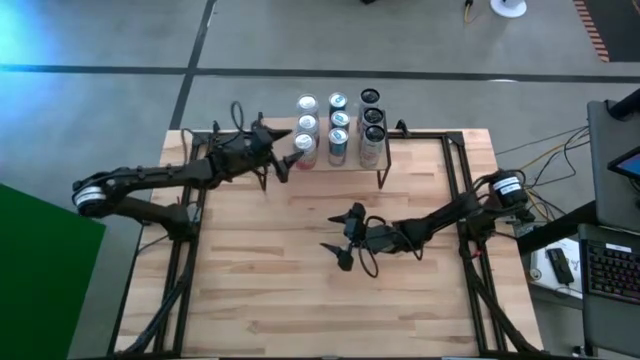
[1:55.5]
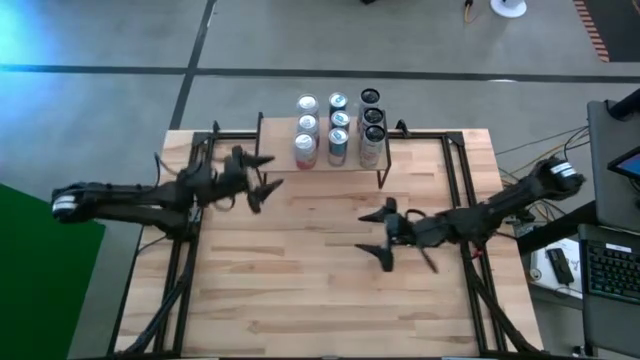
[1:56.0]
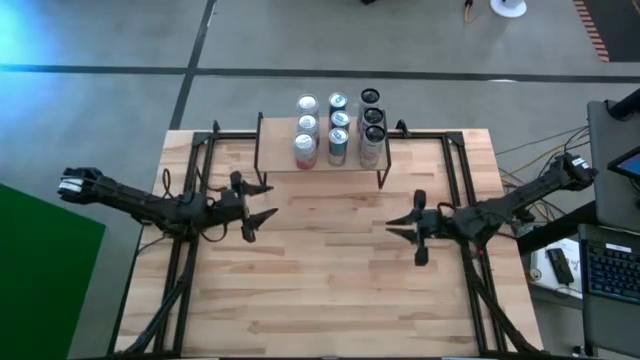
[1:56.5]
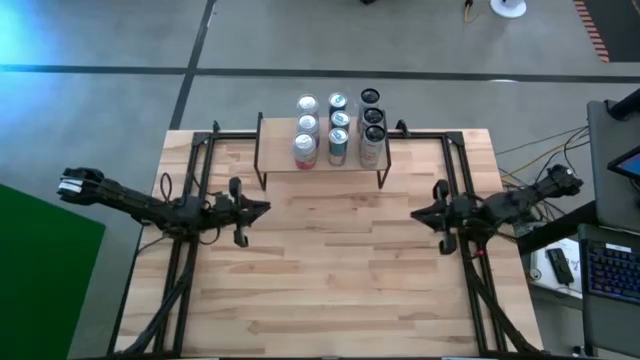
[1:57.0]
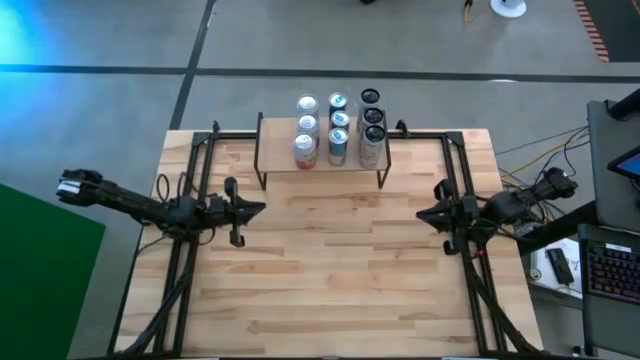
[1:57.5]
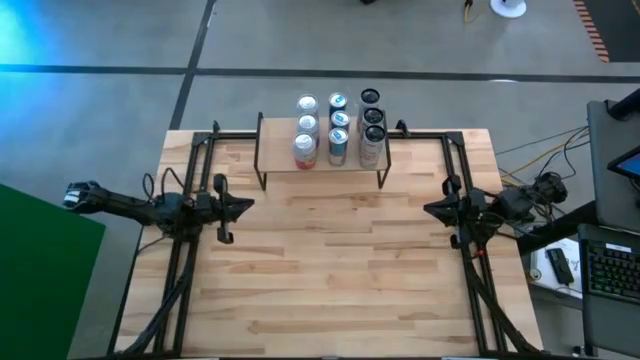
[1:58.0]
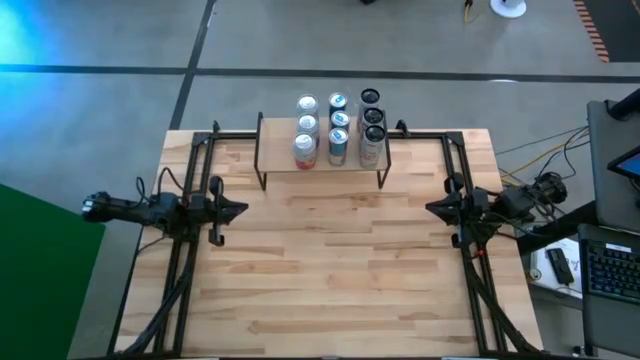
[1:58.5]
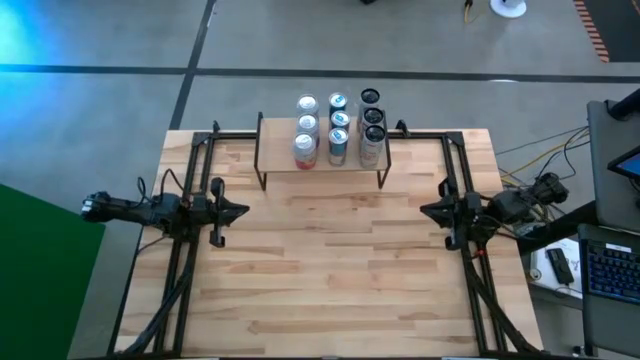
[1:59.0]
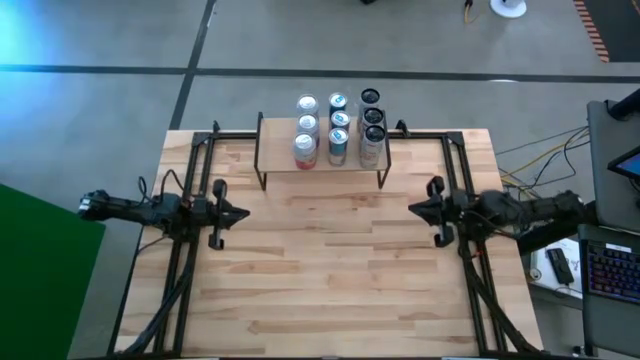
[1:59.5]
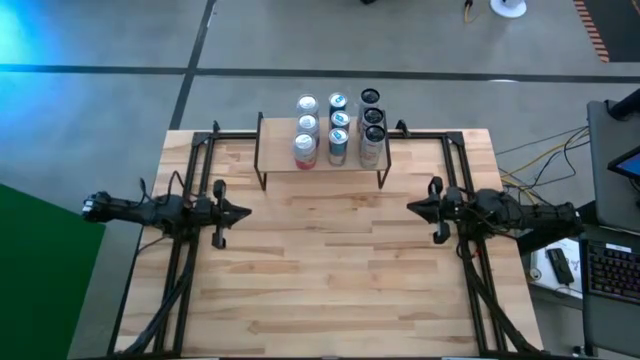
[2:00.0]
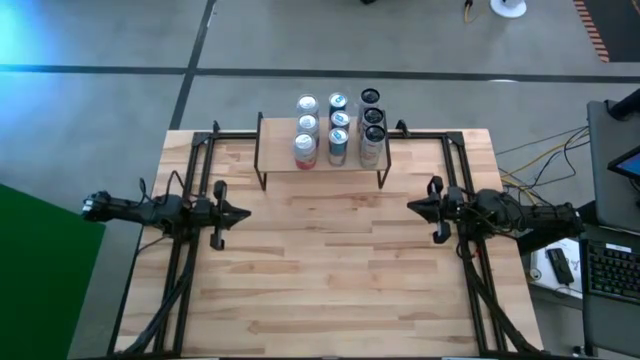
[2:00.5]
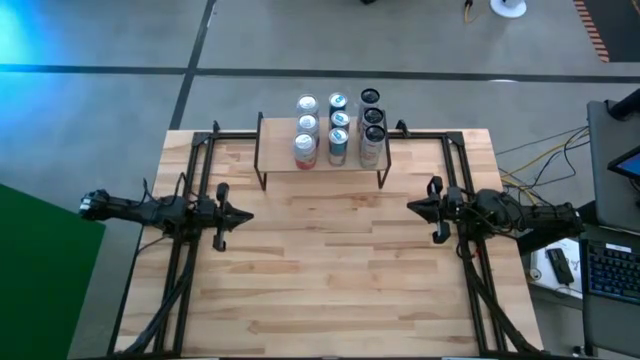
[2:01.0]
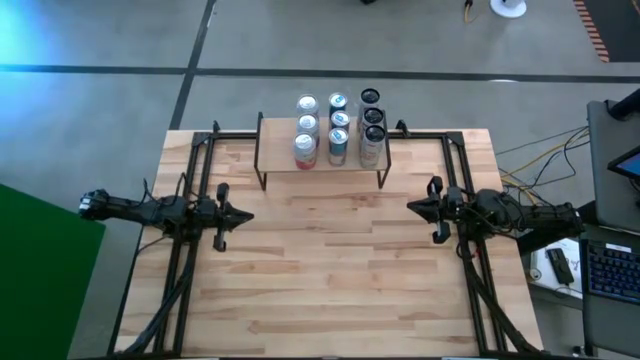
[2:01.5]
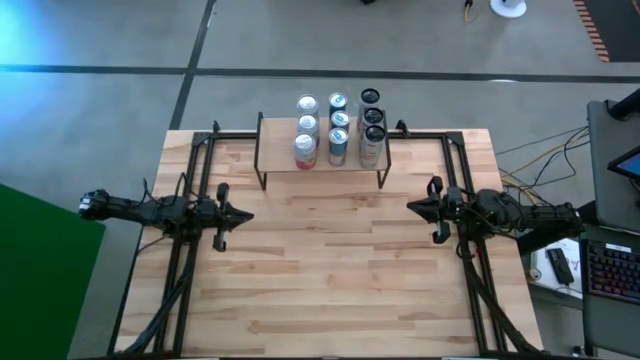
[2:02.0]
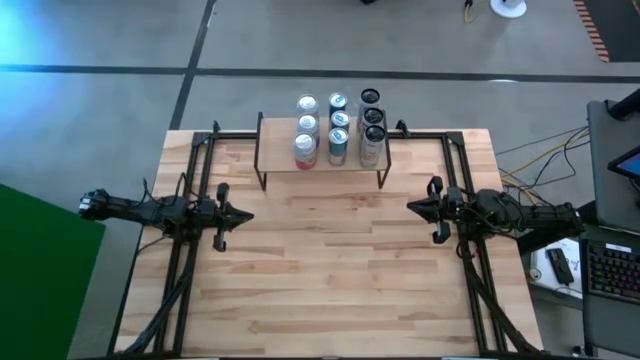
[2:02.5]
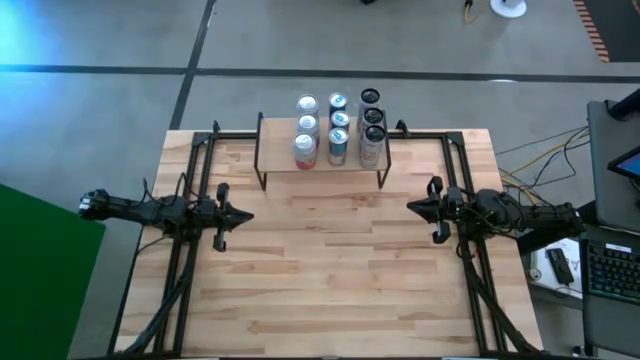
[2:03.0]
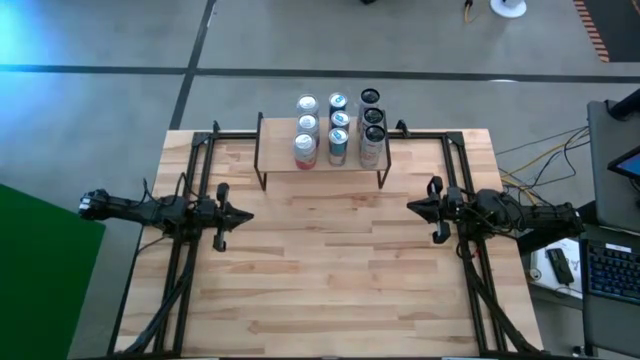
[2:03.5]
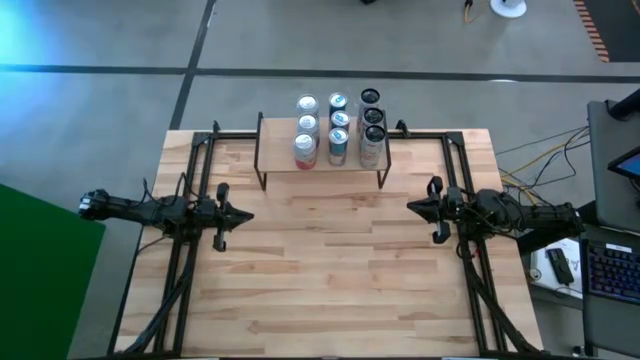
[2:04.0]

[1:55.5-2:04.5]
Task: Place canned beverage on shelf
Return to Home Position

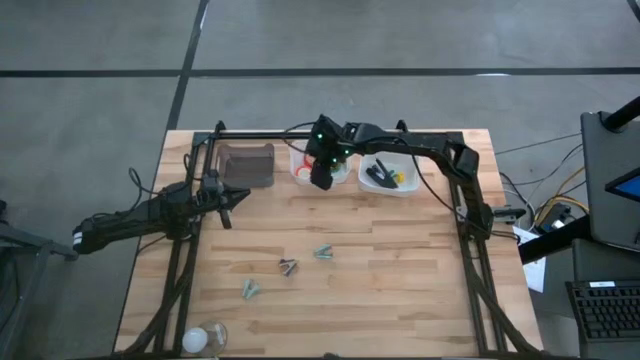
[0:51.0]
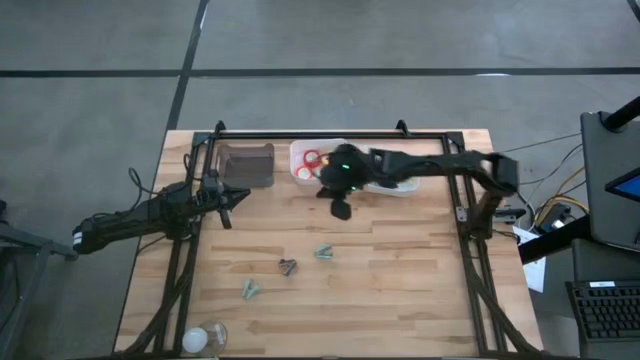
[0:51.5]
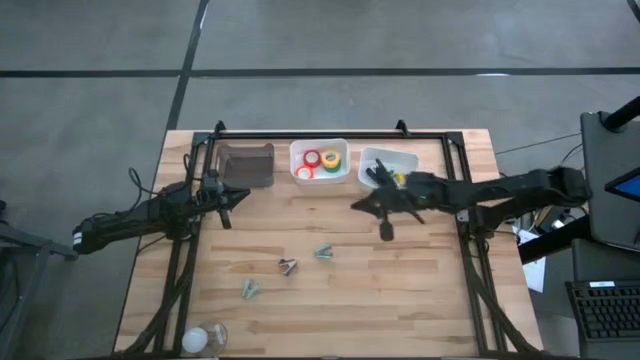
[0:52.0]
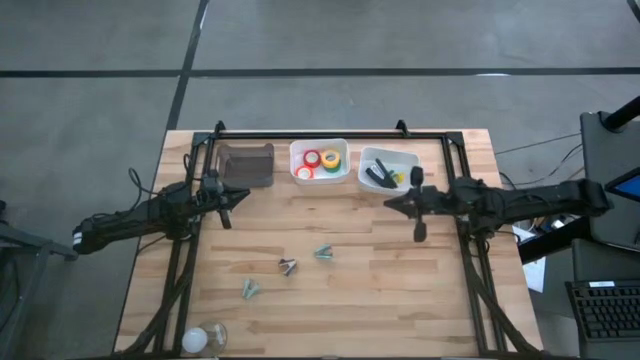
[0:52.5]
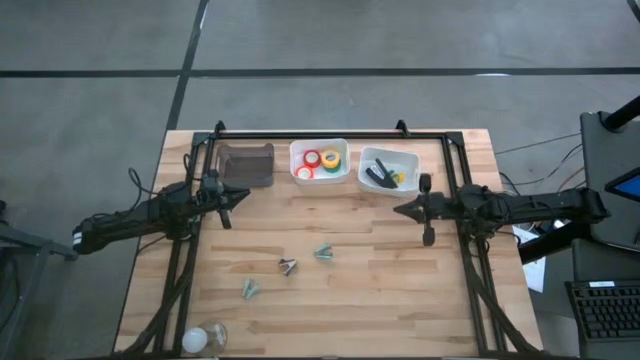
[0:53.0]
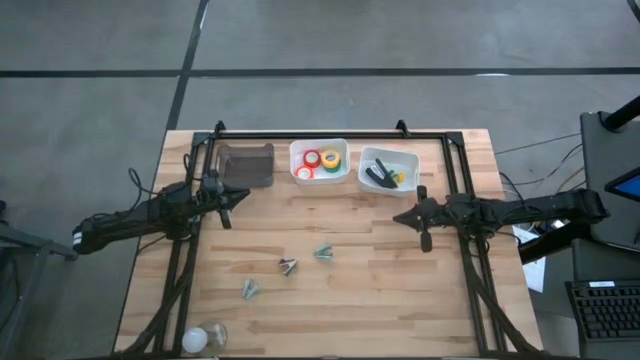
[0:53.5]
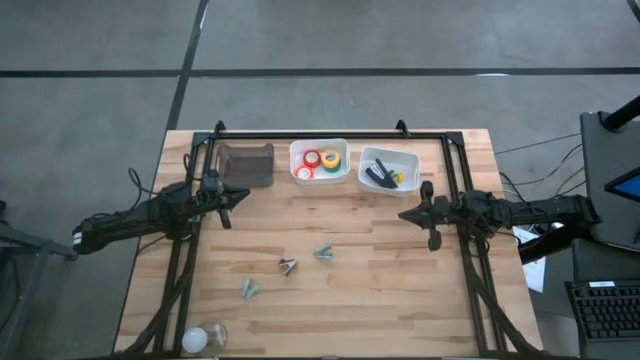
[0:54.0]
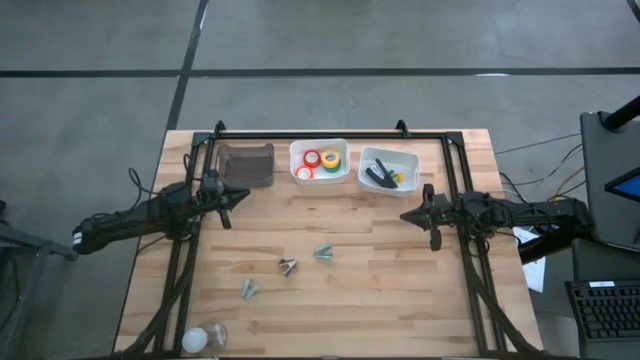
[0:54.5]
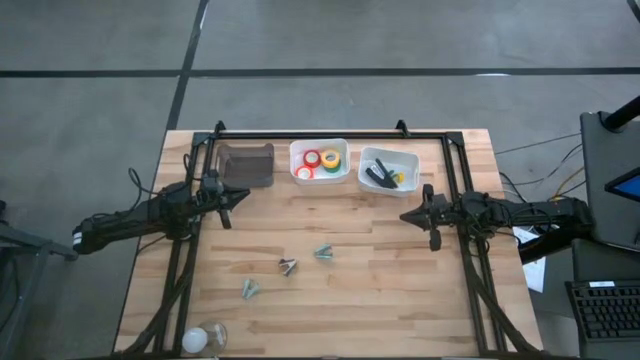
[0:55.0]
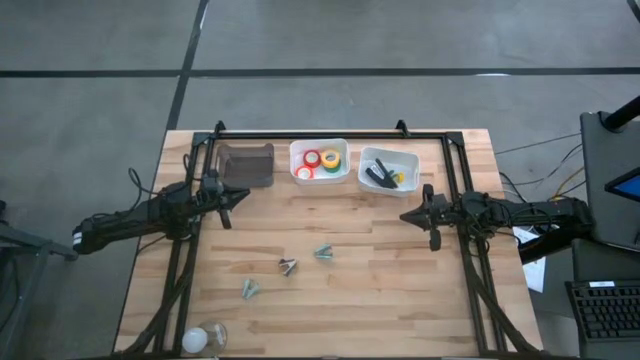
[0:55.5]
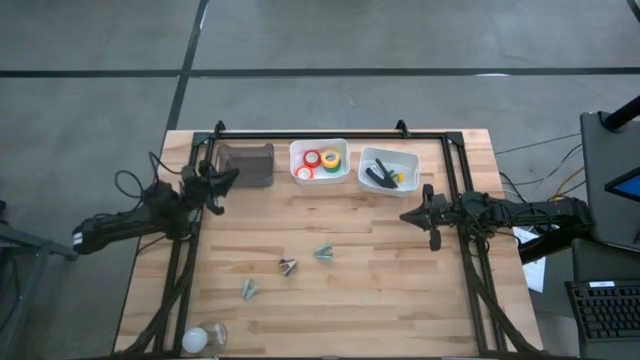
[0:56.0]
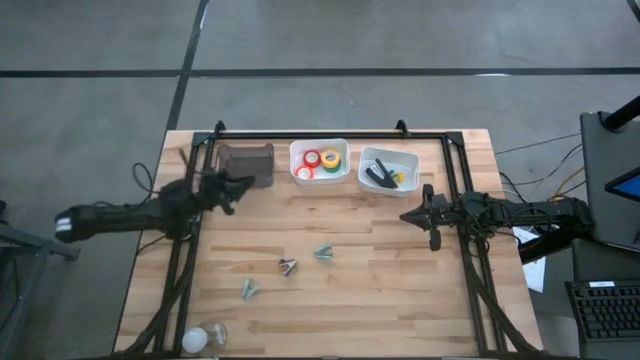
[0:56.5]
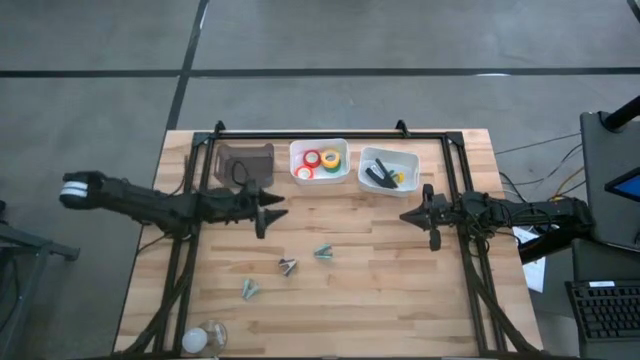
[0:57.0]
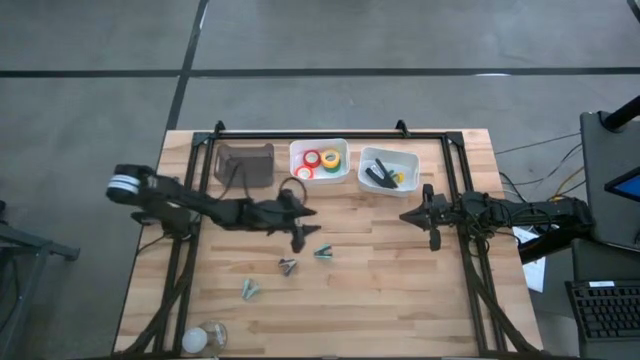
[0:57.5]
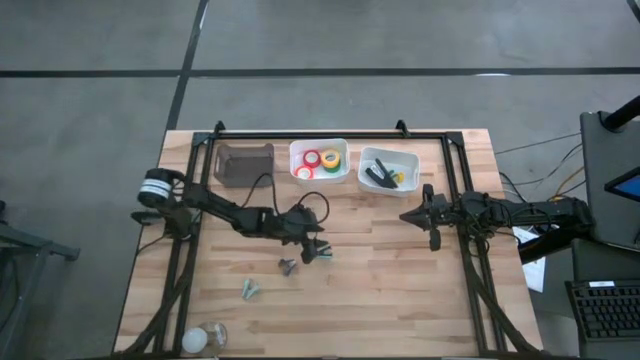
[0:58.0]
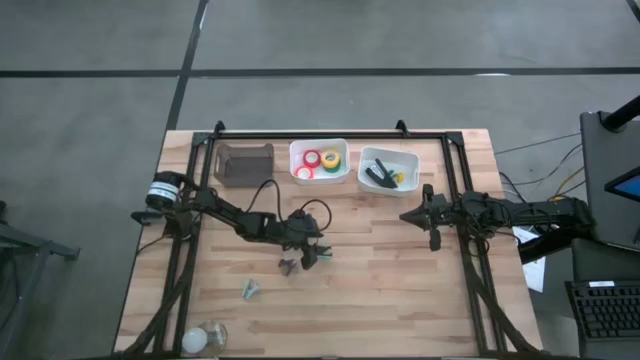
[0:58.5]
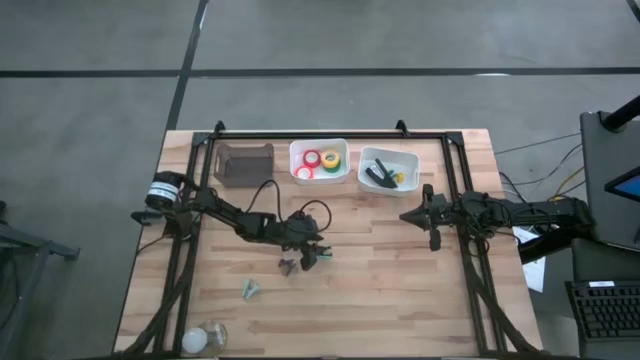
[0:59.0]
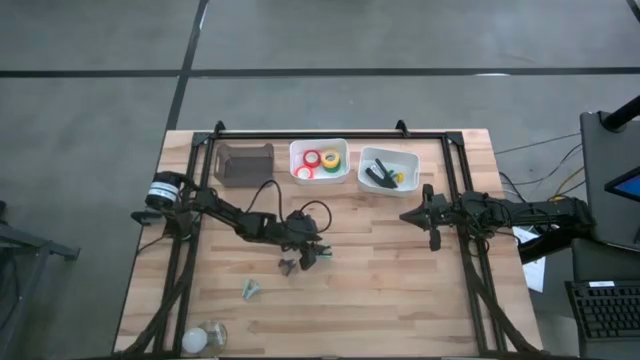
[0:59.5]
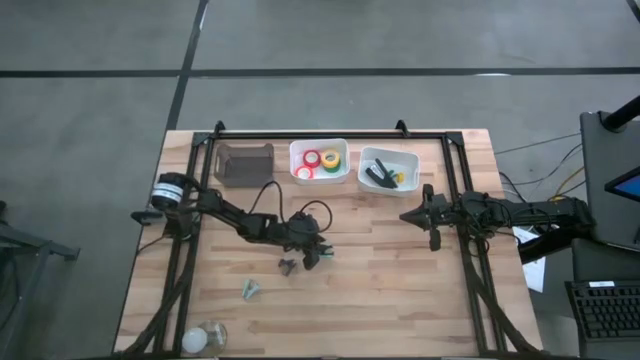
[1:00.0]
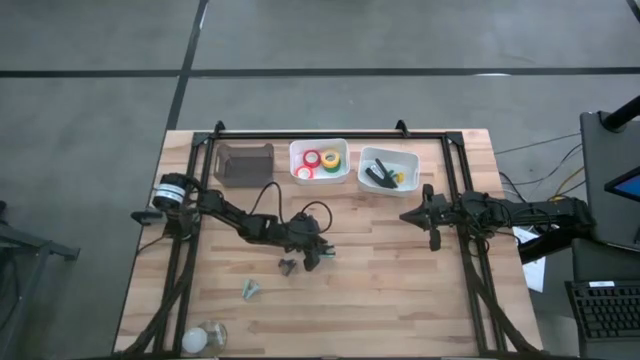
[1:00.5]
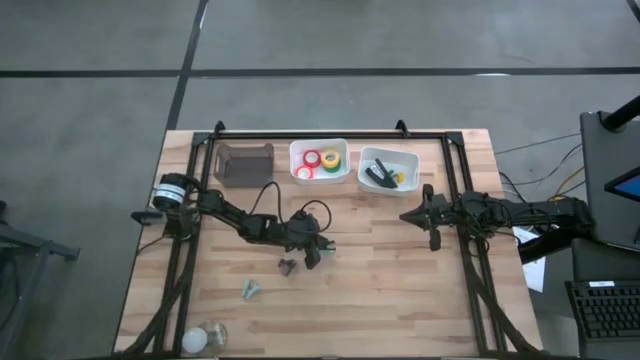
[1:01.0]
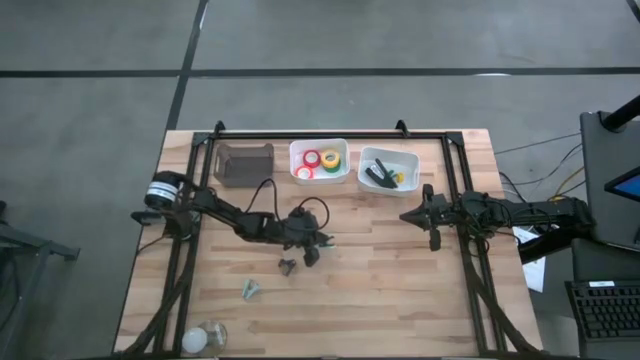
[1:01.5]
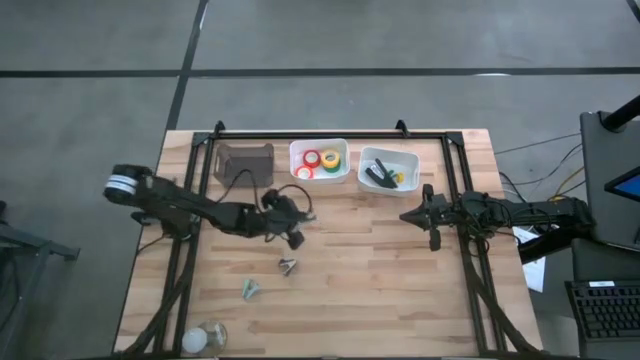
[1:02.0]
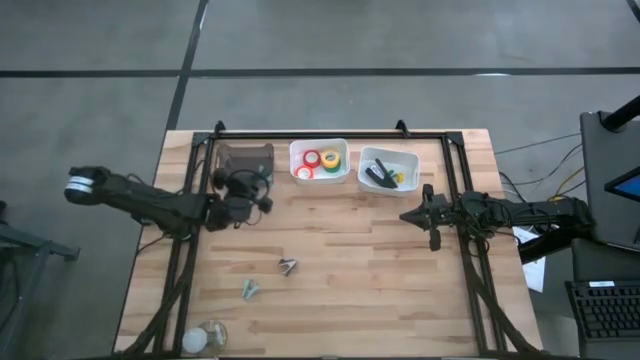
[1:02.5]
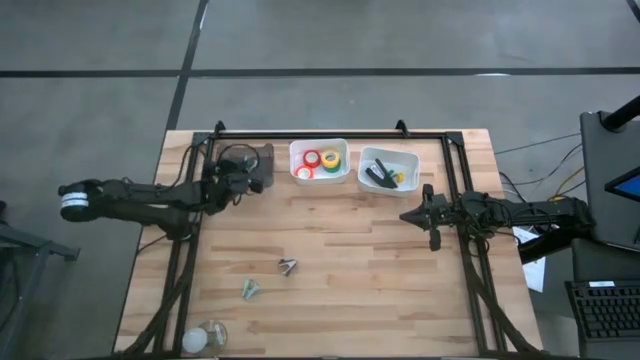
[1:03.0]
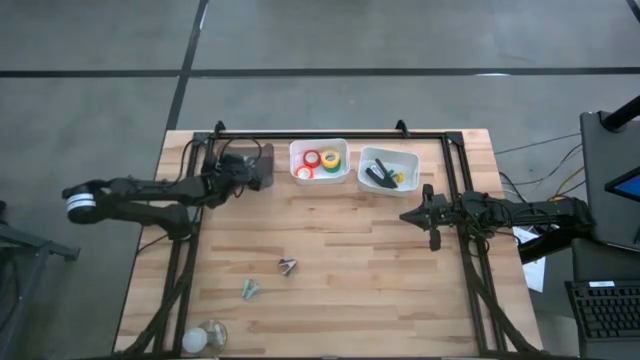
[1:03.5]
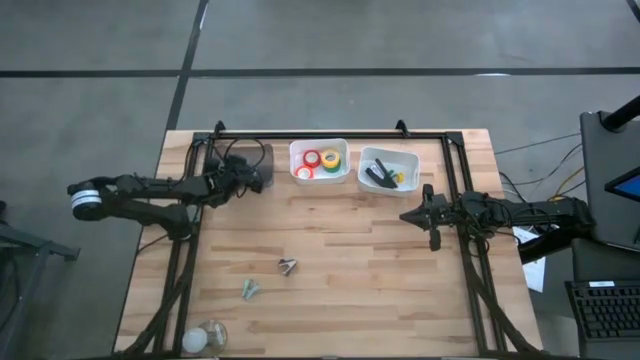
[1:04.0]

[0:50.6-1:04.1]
Task: Pick and place Stapler, Stapler remover, tape
Put the top right blue staple remover into the black bin
